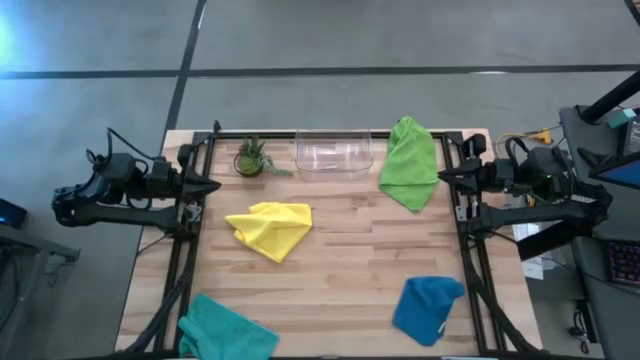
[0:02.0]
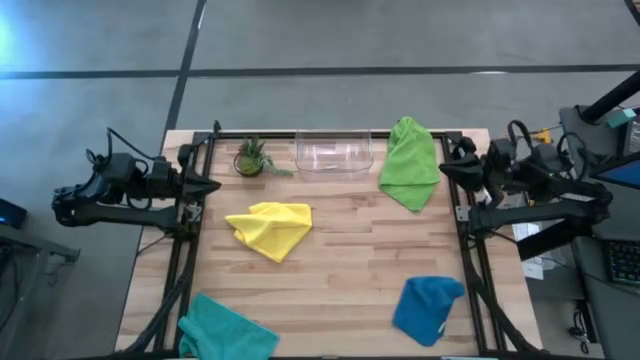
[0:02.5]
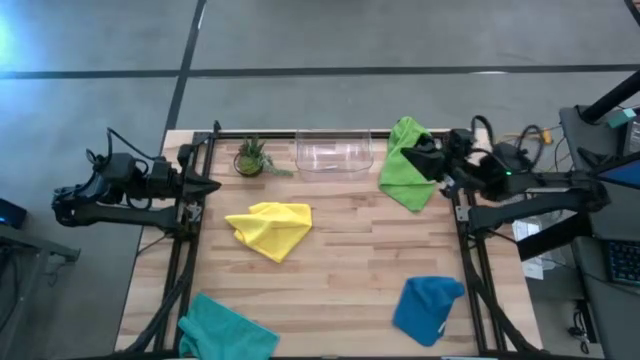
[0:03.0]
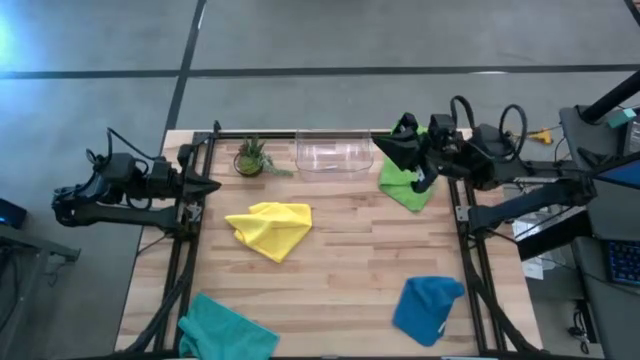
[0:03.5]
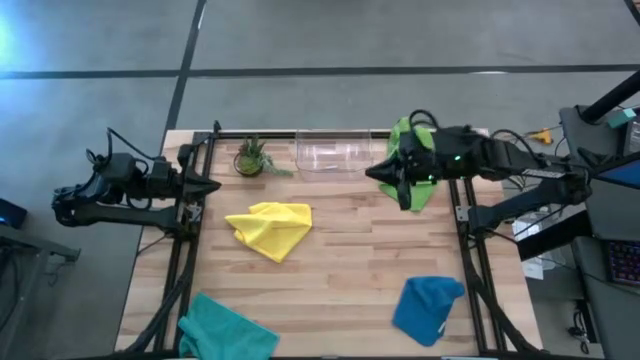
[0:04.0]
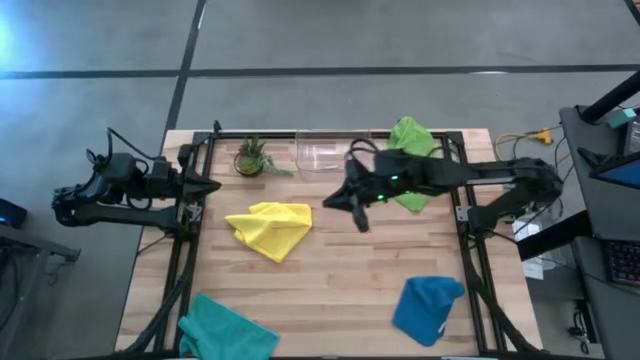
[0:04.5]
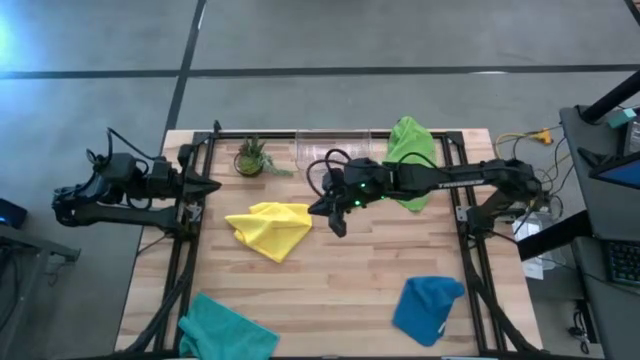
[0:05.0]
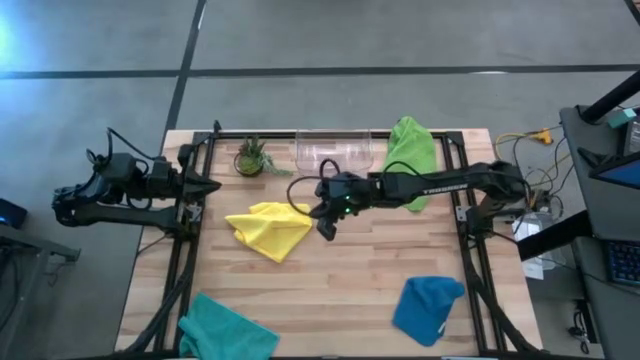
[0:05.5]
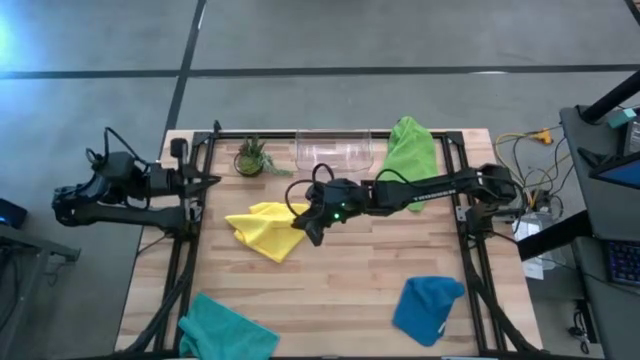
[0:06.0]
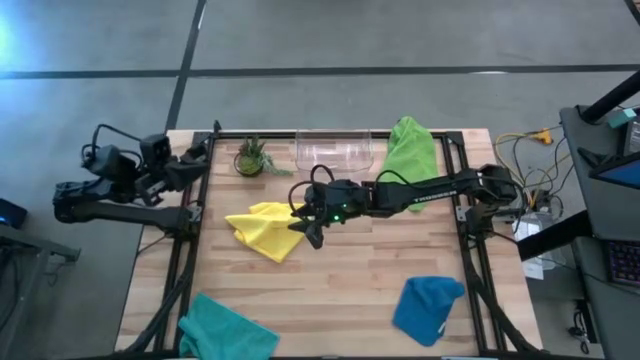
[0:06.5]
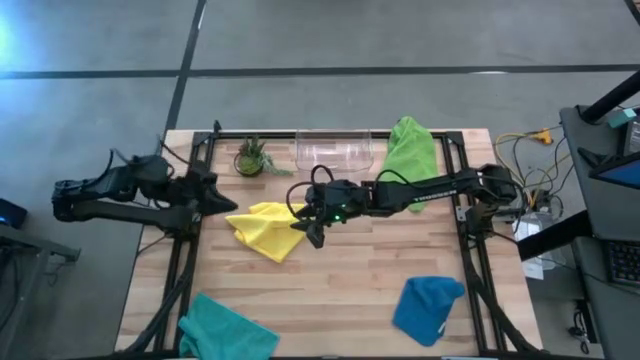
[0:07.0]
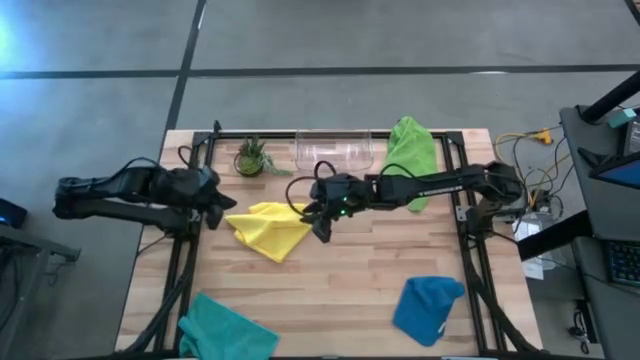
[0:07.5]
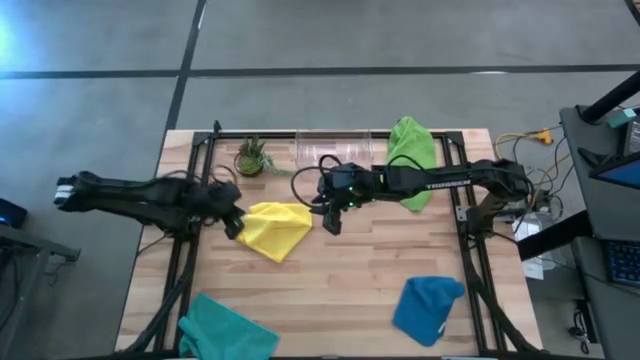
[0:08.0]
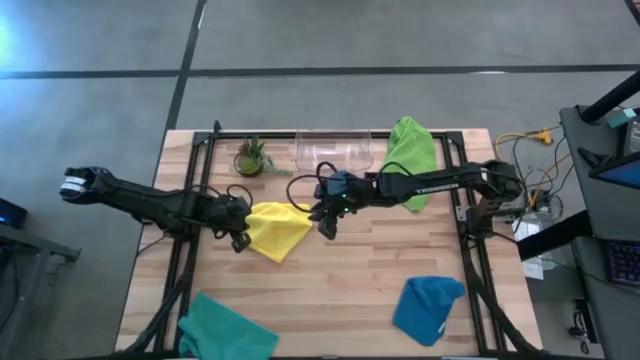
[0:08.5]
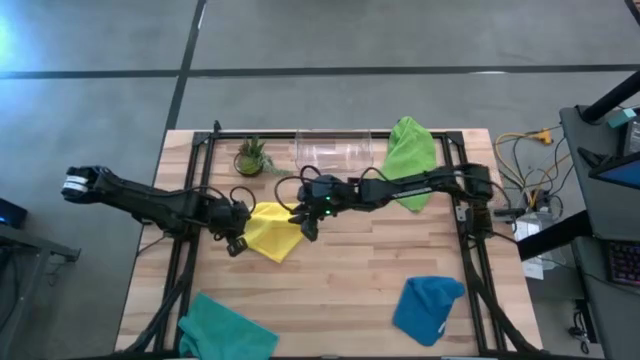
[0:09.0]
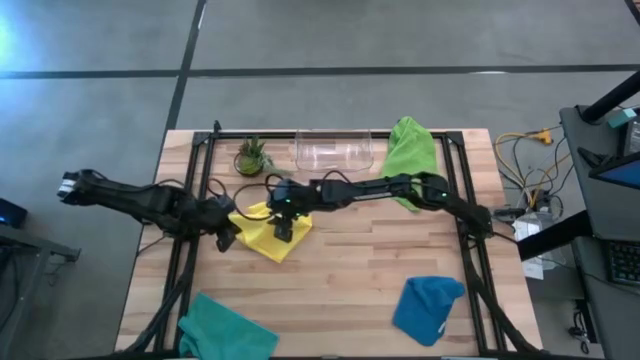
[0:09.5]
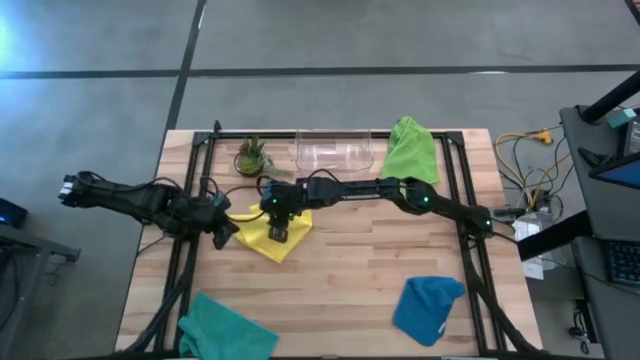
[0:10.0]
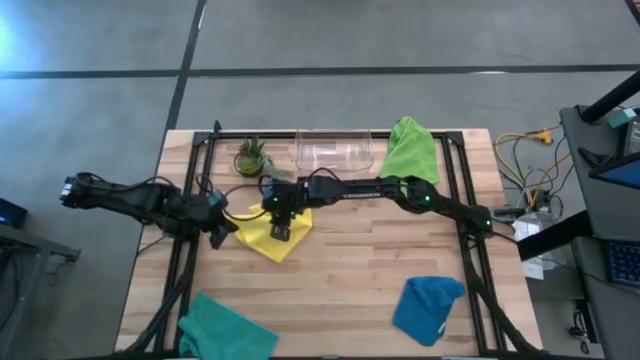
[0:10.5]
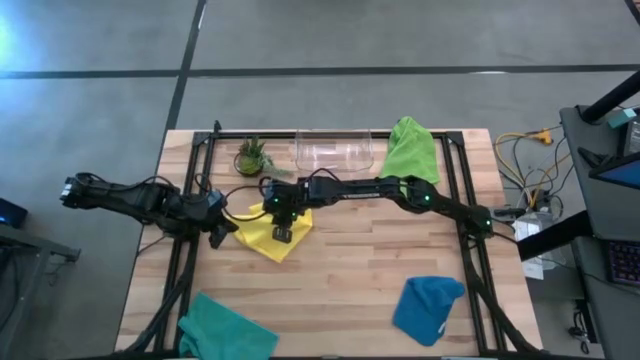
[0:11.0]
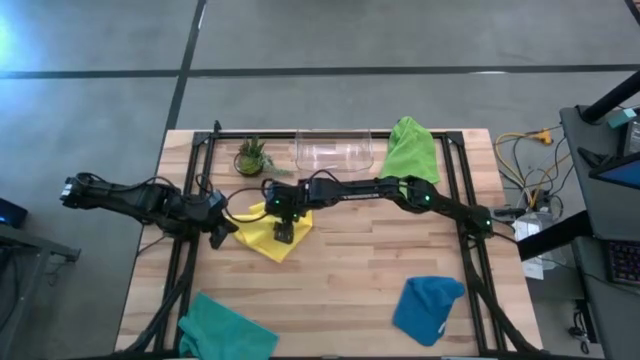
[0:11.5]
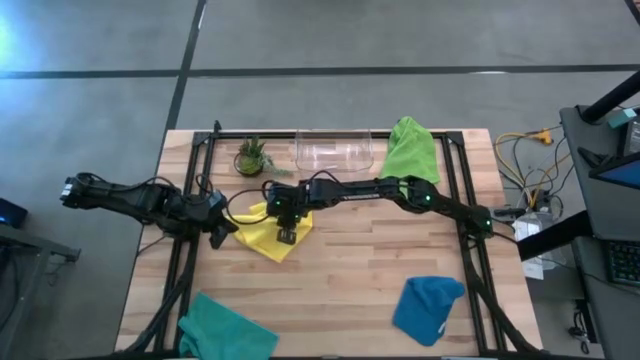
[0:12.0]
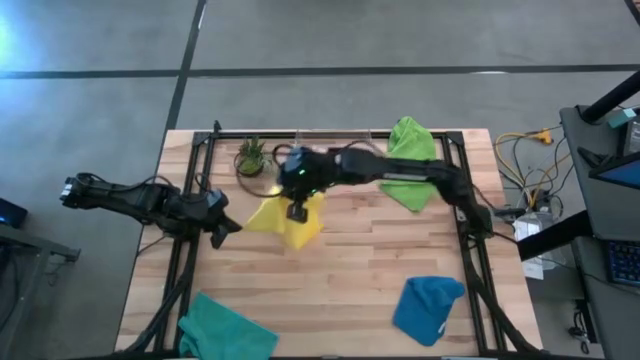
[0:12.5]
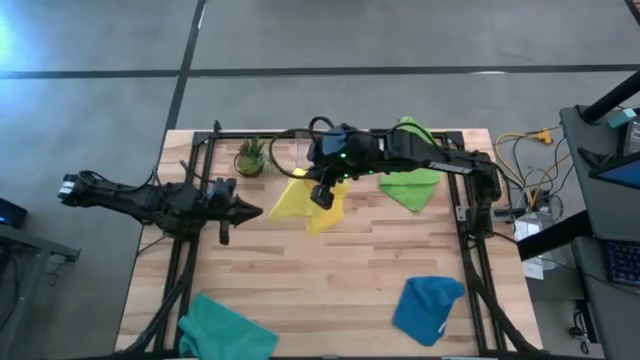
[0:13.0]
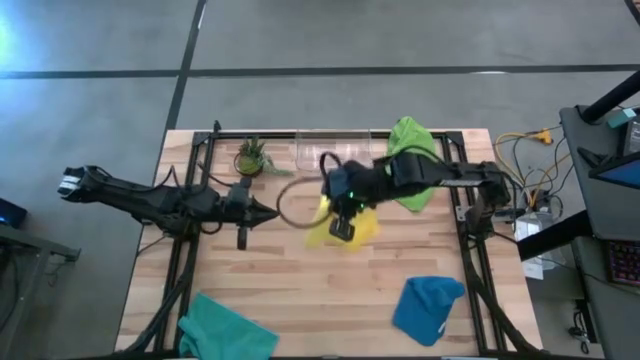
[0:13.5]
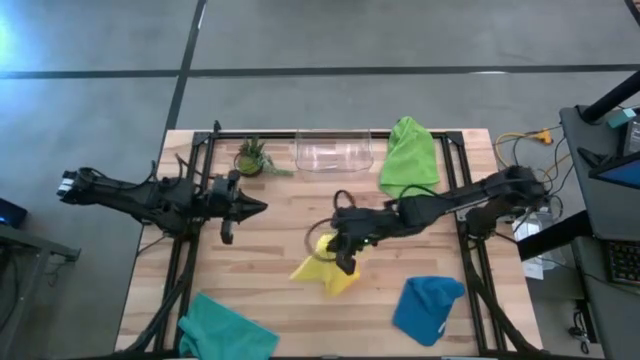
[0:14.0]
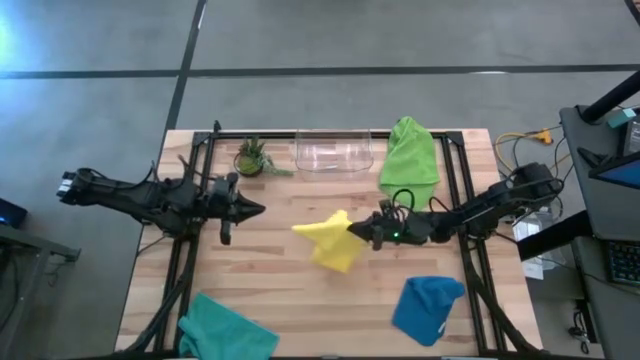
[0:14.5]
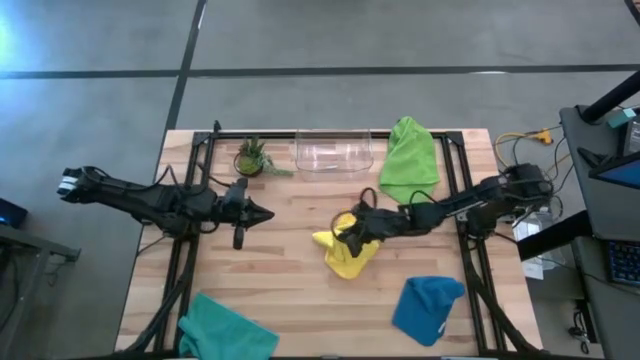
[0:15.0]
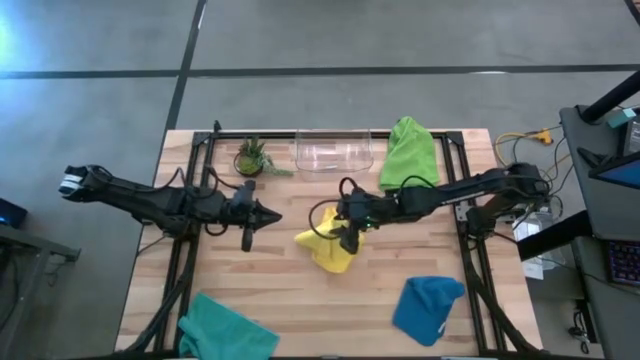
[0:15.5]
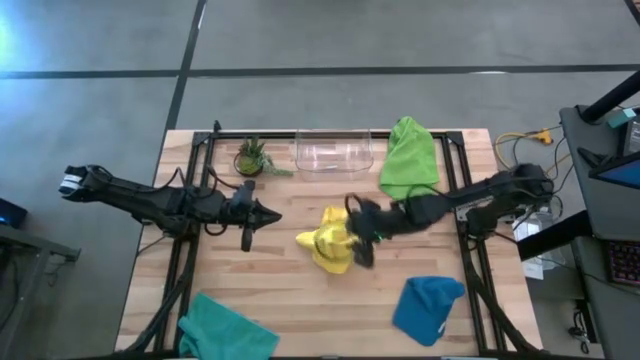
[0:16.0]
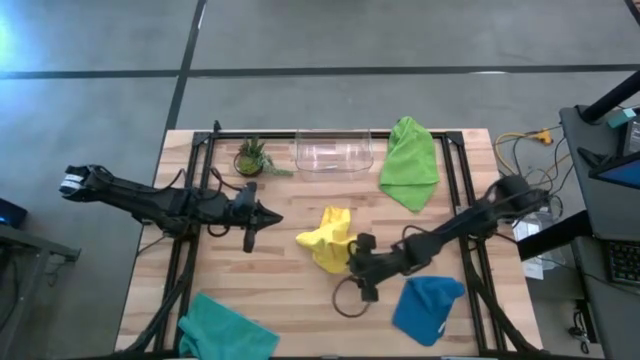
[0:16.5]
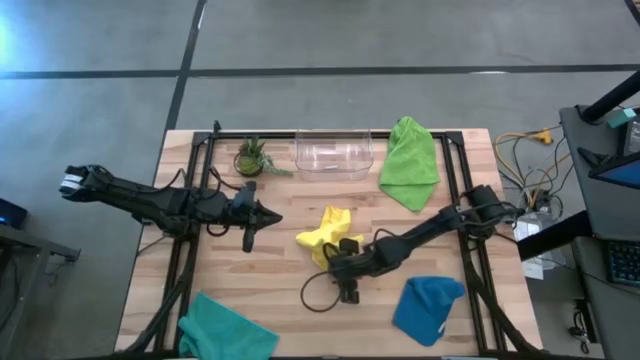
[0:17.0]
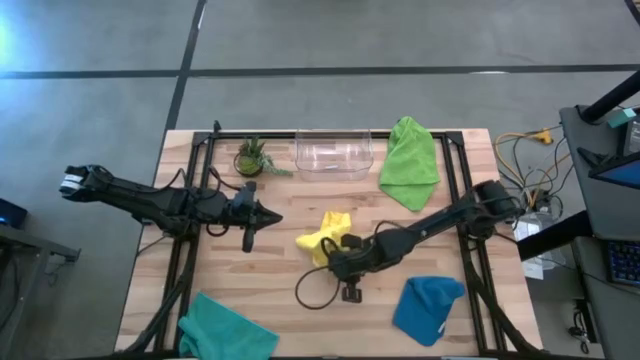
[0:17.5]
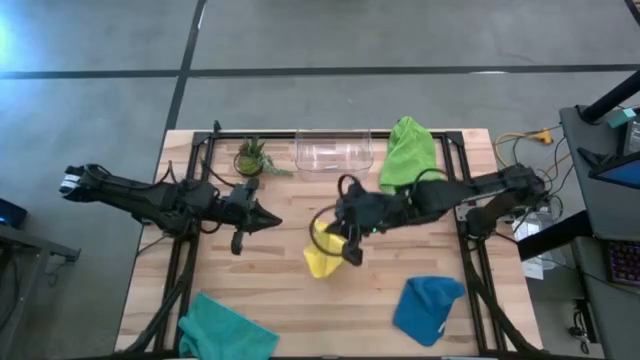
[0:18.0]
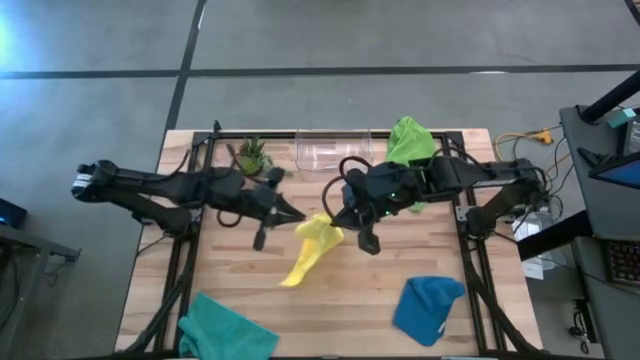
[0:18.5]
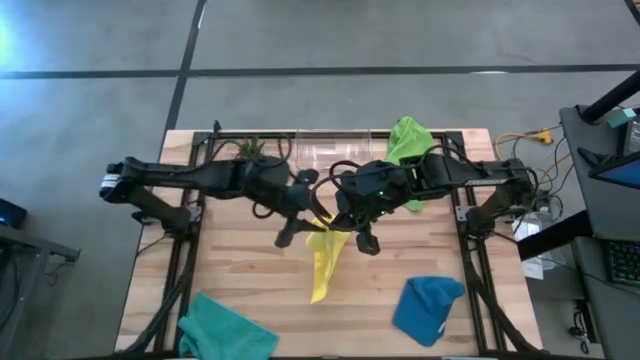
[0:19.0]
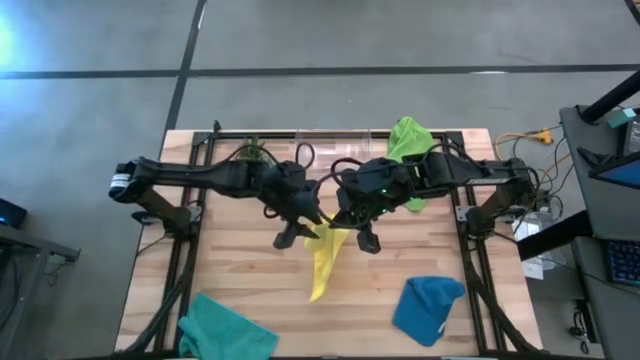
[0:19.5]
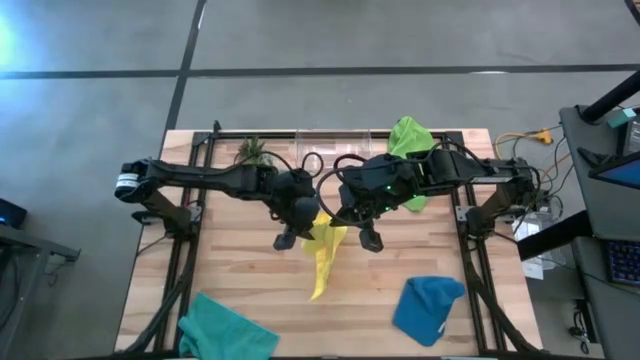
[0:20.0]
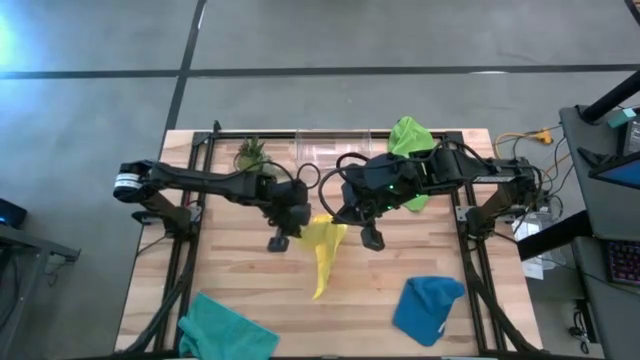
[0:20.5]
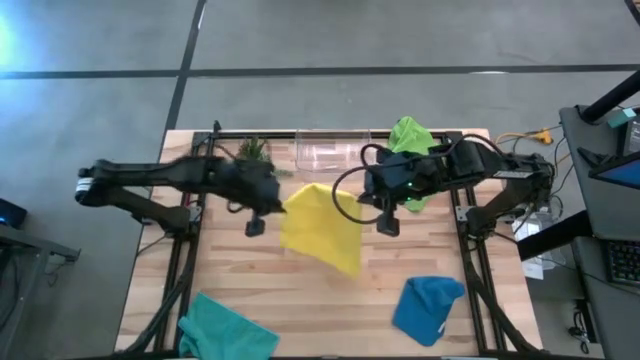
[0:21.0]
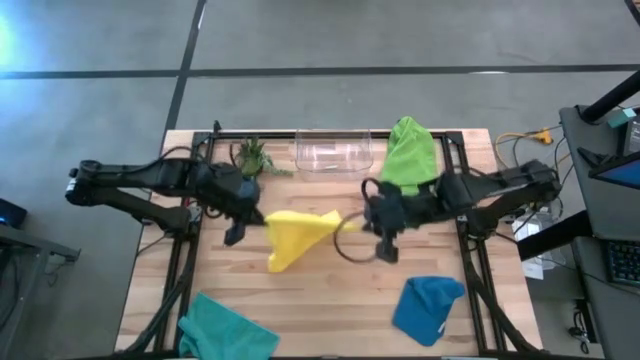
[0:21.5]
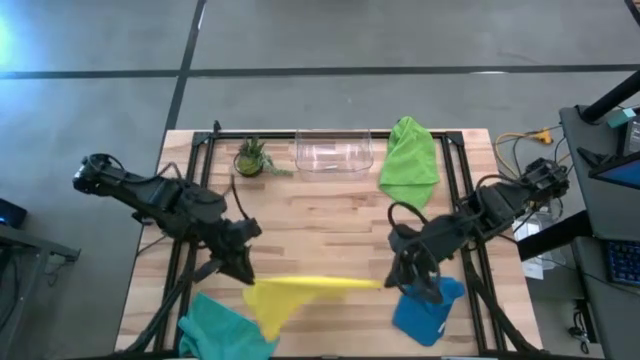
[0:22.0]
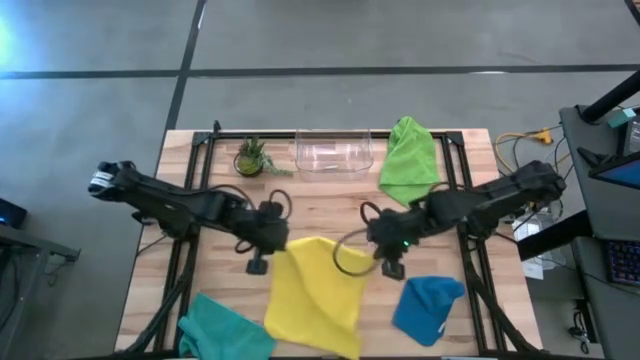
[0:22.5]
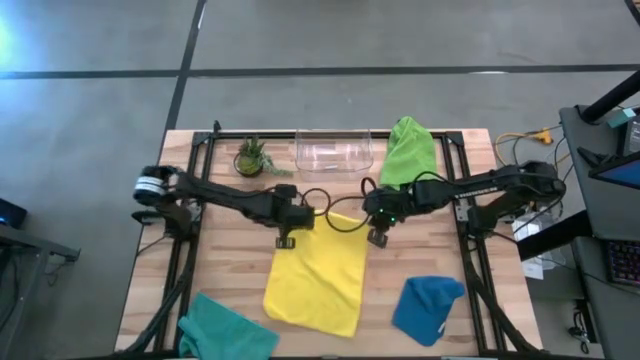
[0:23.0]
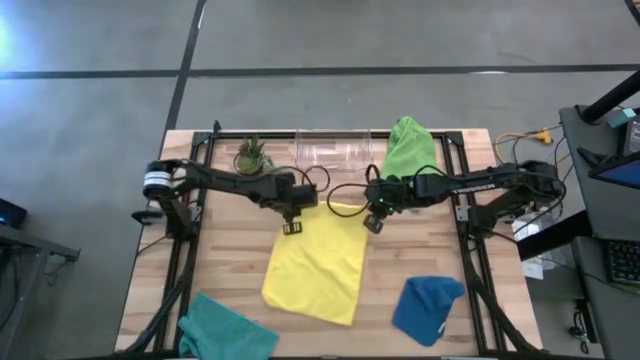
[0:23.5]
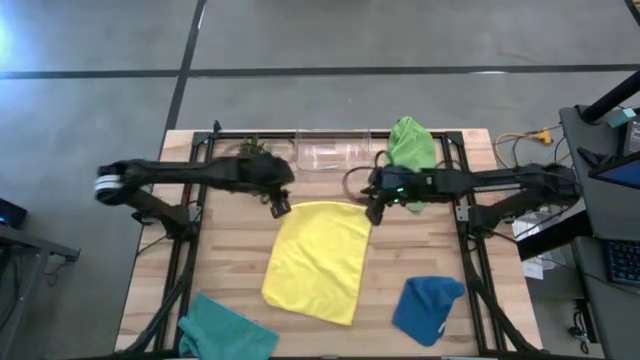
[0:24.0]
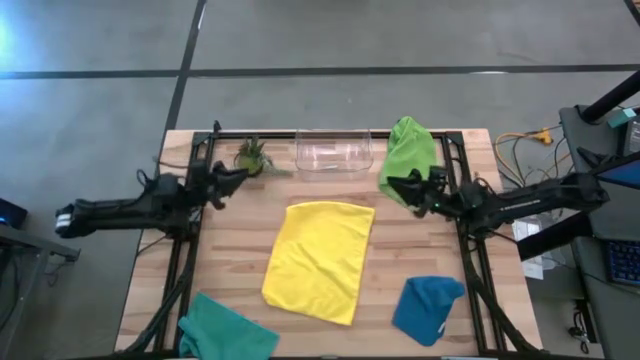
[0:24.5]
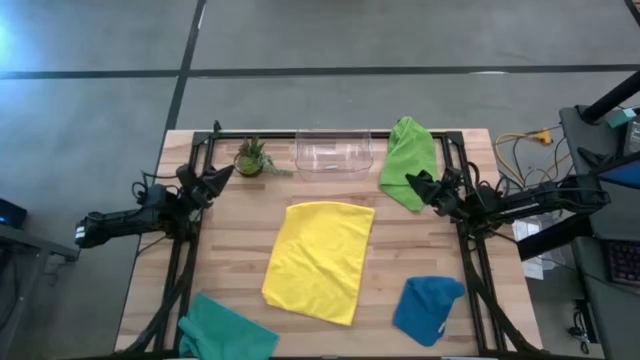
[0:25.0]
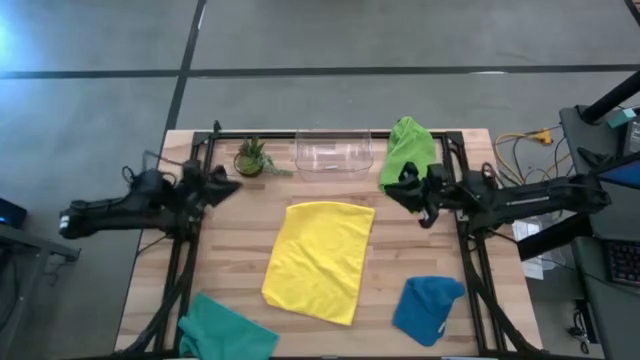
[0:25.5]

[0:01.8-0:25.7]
Task: Fold microfiber towels
Fold the yellow microfiber towel
